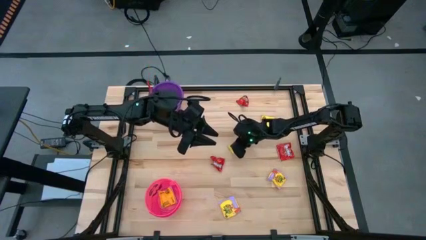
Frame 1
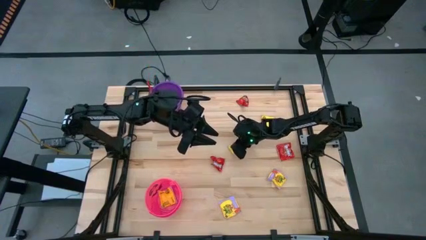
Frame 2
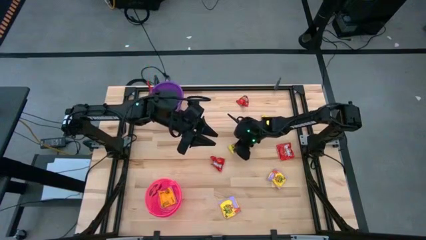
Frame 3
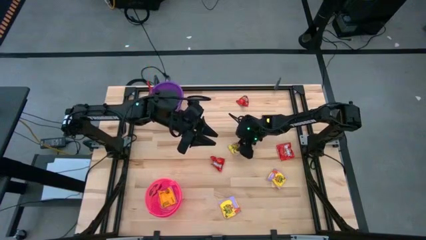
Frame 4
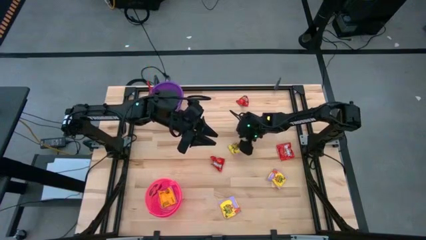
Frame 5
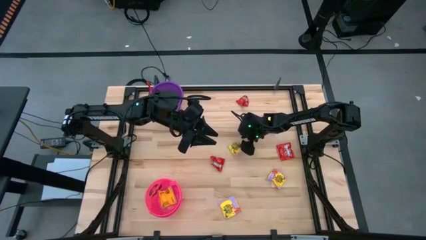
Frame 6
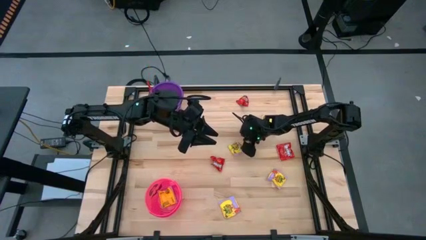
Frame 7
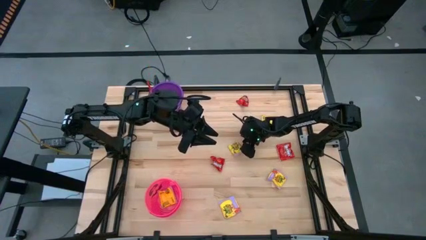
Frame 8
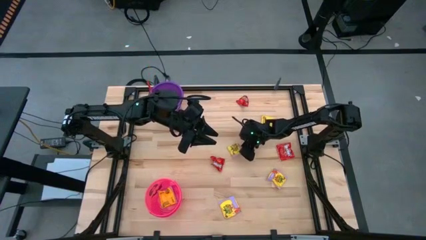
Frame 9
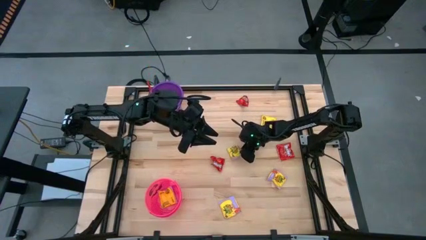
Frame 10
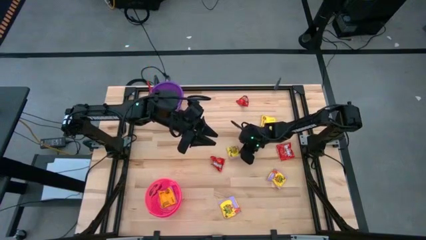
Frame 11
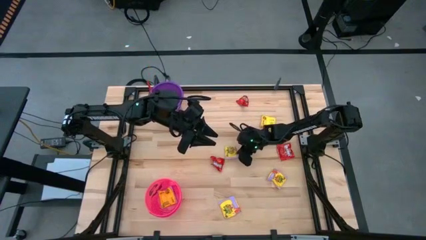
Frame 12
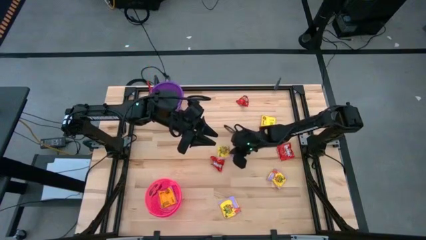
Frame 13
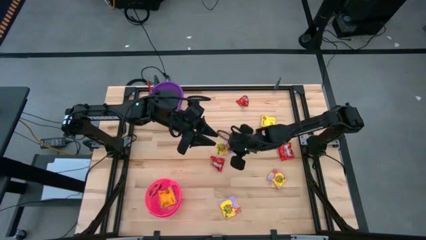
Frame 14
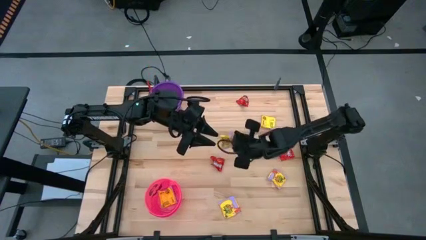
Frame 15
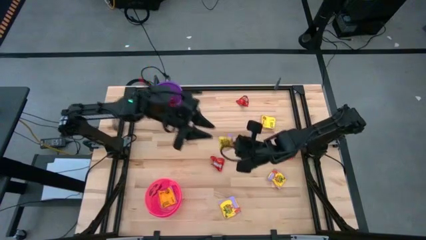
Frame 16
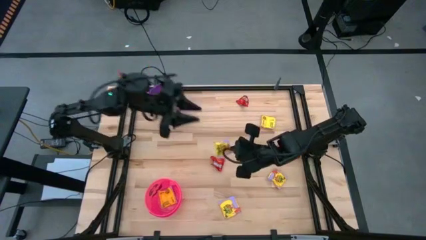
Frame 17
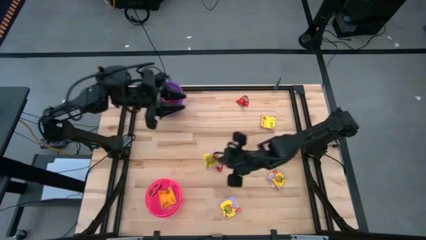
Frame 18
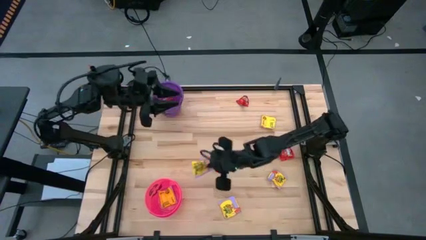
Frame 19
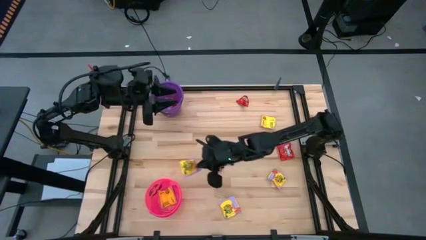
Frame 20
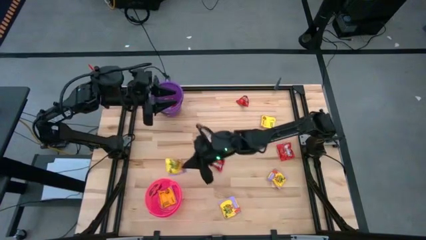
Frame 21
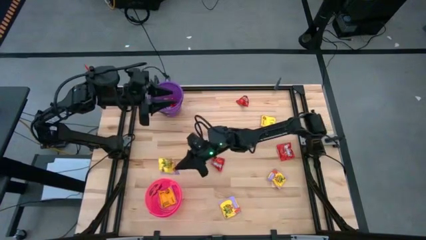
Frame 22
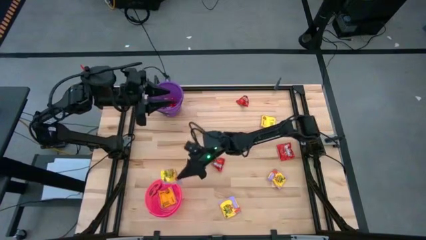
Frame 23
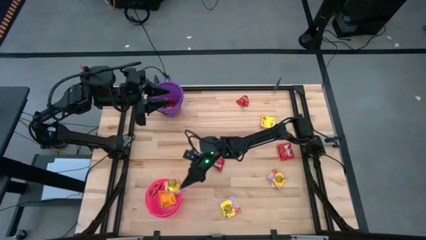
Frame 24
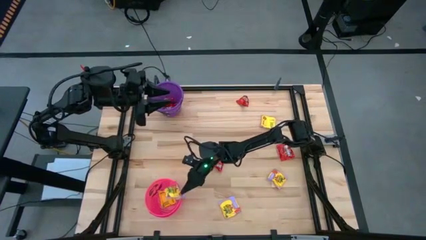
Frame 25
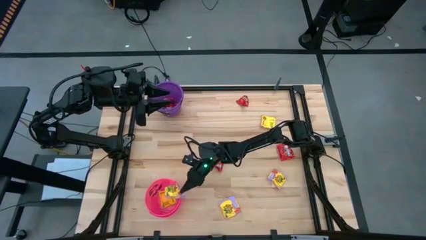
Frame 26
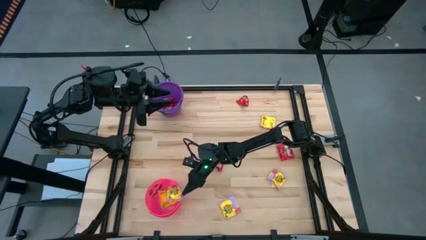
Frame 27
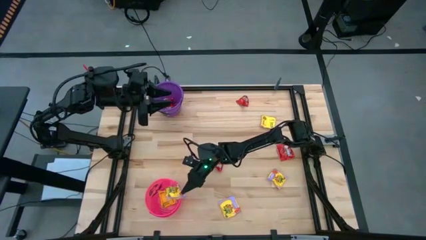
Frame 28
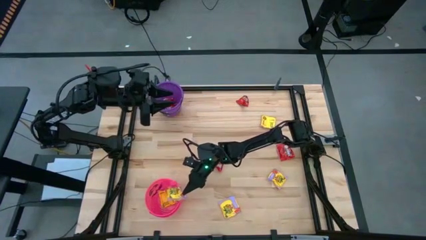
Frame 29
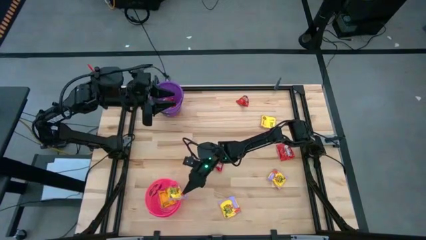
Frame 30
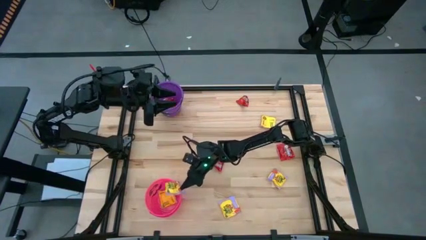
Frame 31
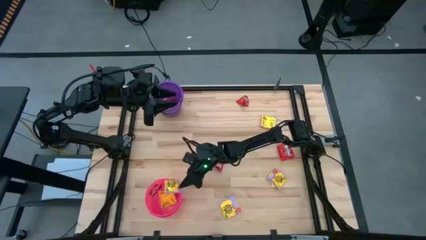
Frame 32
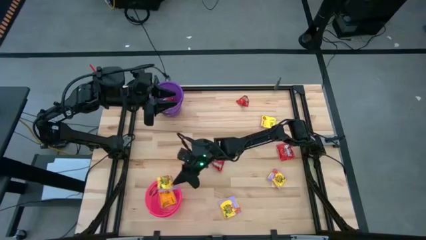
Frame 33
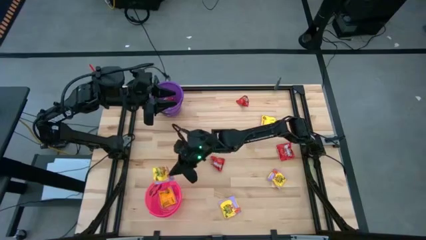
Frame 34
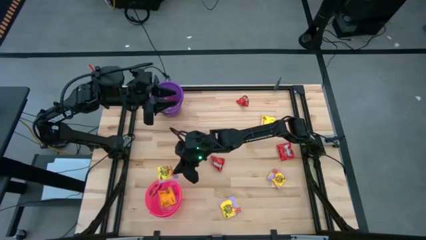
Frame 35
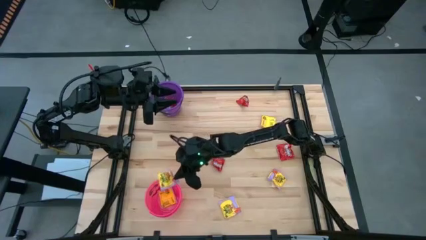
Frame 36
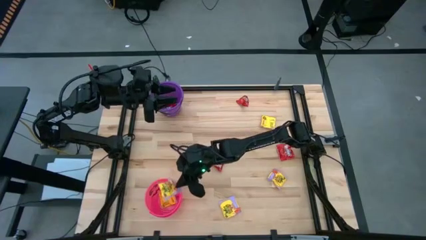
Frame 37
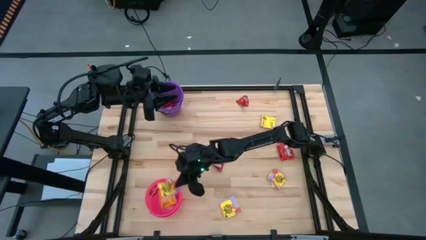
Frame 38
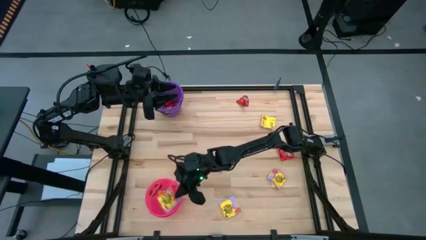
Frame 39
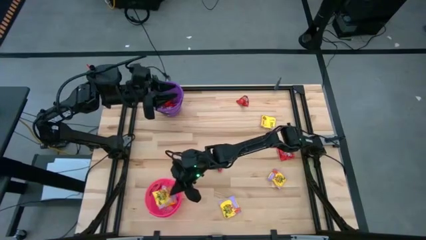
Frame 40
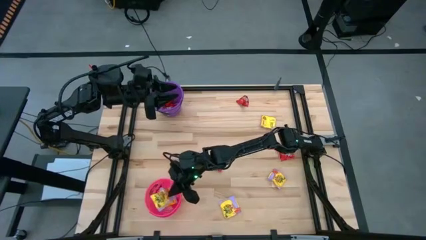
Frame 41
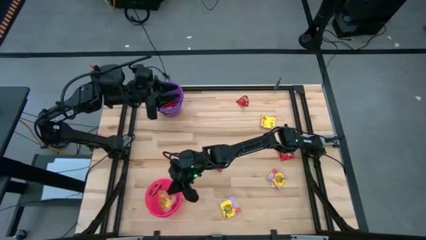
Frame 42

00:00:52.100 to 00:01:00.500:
Task: Sort candy by brand, put in halloween buckets
Put the yellow candy into the pink bucket

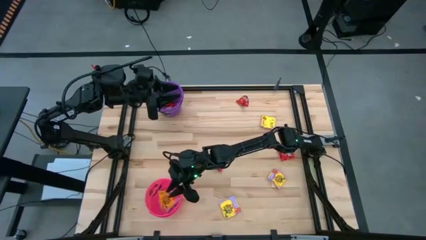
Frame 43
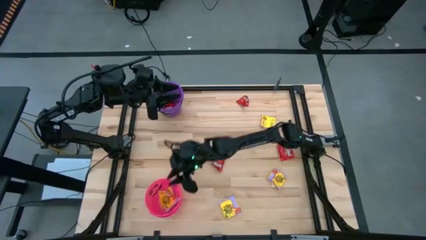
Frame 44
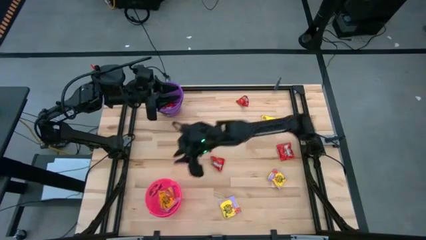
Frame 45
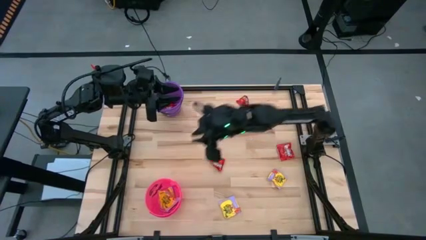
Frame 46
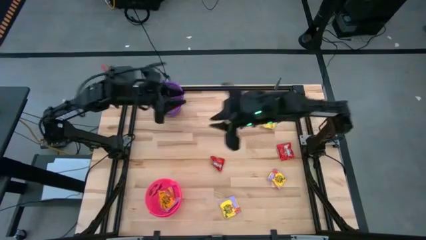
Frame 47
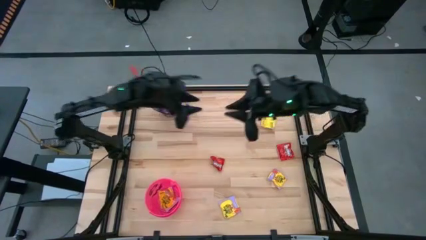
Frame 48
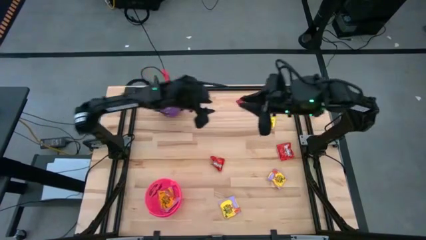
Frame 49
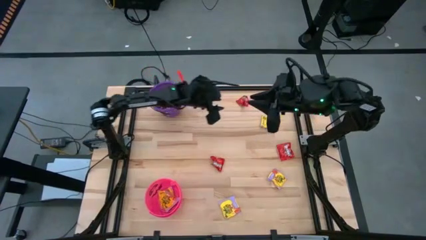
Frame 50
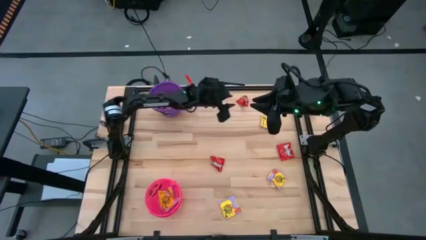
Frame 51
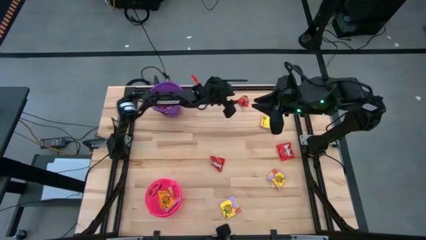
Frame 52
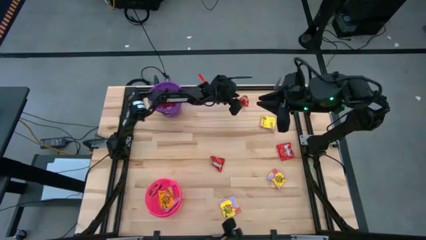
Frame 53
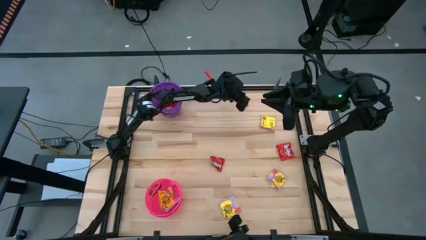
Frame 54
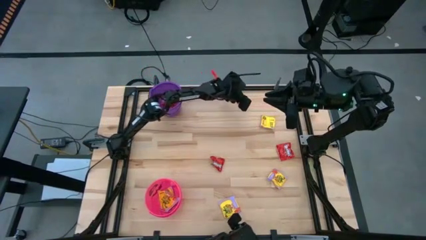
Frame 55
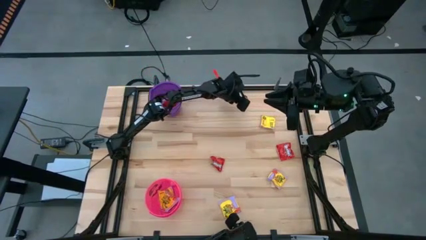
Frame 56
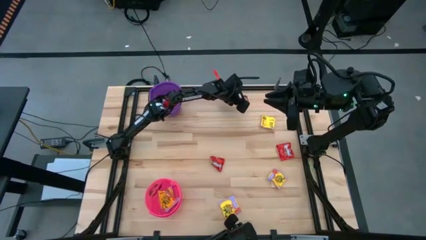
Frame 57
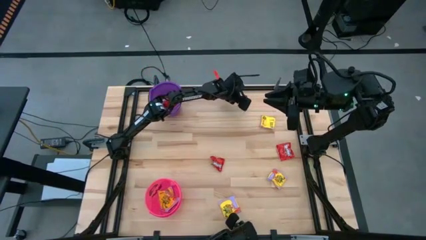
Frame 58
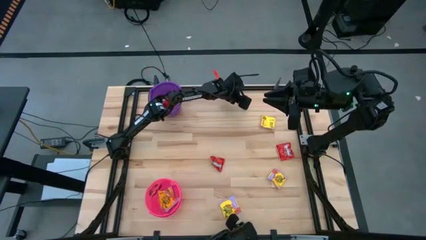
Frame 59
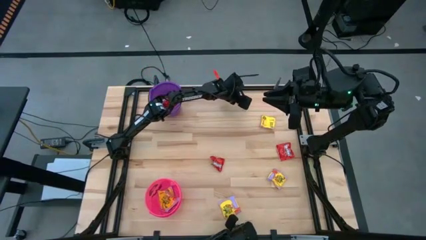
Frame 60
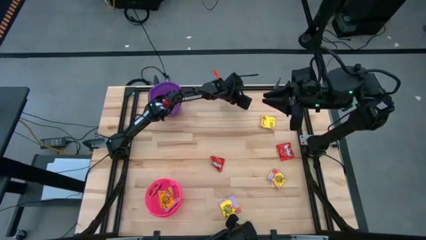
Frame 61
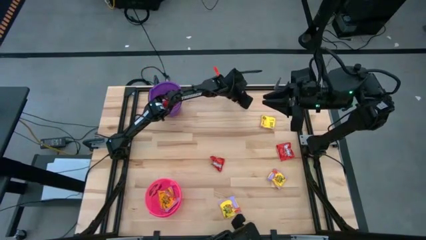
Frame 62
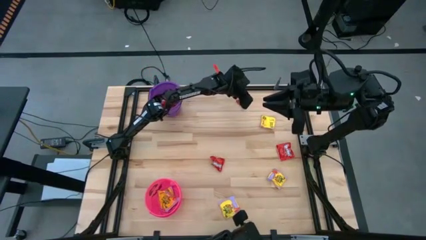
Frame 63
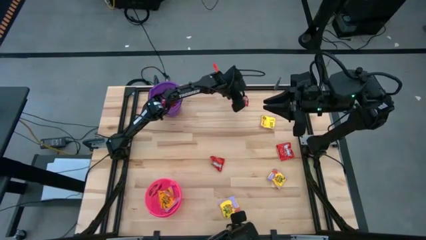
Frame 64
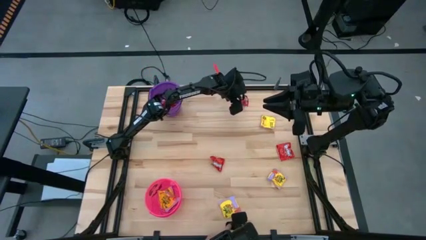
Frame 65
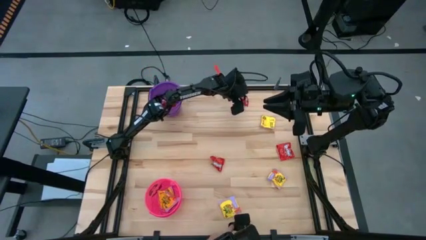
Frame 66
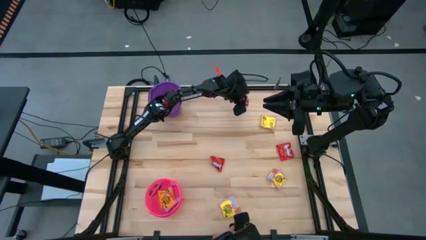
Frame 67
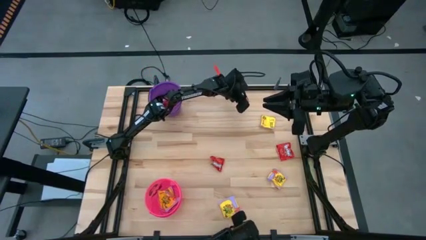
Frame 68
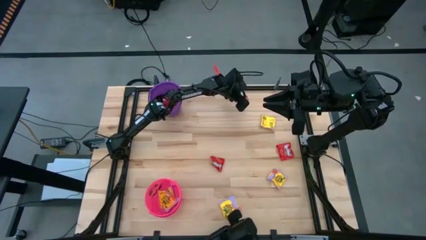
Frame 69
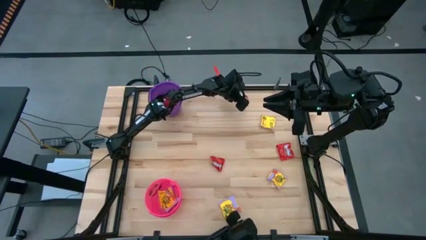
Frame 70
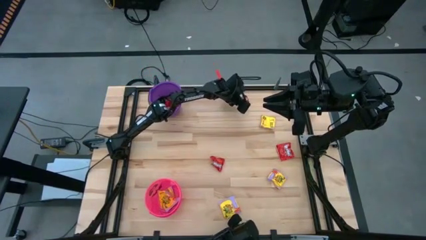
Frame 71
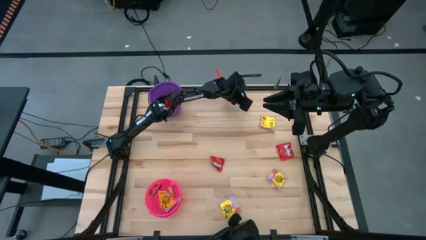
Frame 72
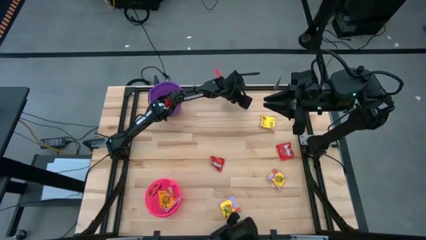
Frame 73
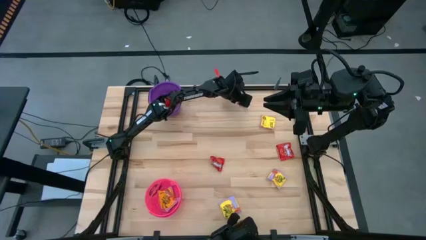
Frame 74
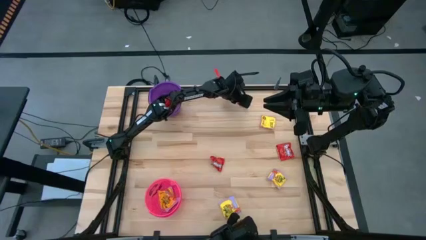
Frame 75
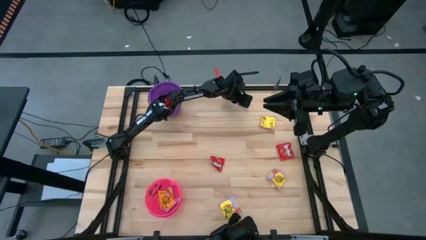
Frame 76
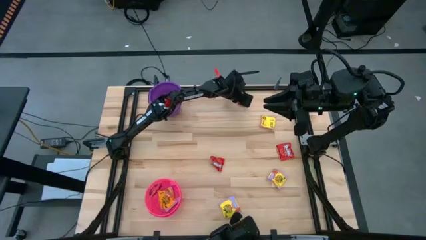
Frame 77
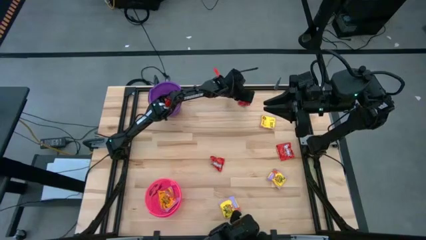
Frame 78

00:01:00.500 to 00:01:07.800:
Put the red candy into the purple bucket
